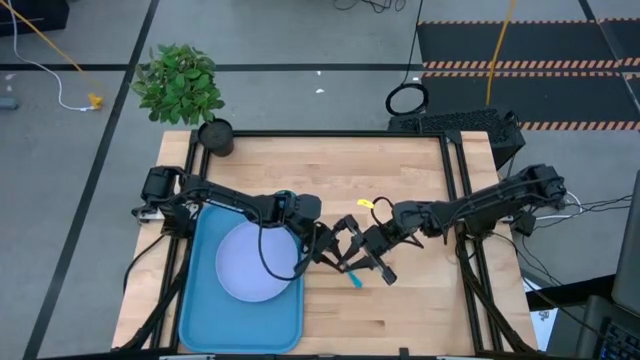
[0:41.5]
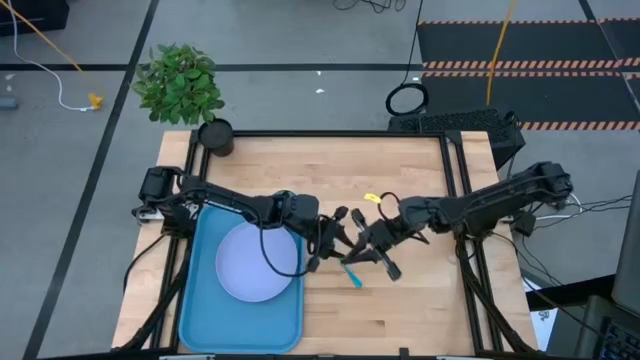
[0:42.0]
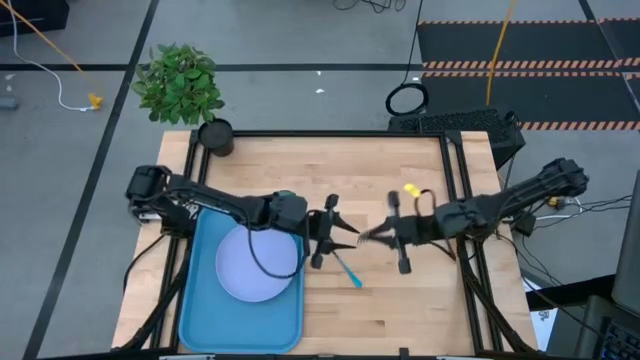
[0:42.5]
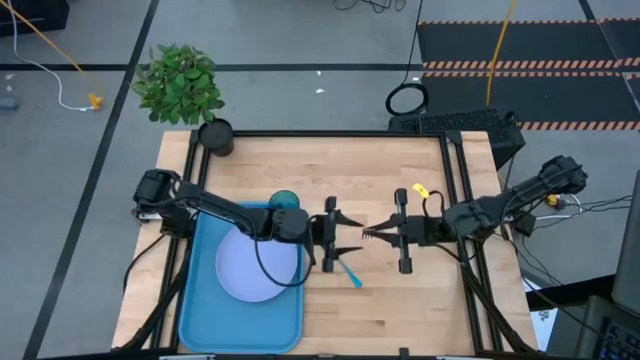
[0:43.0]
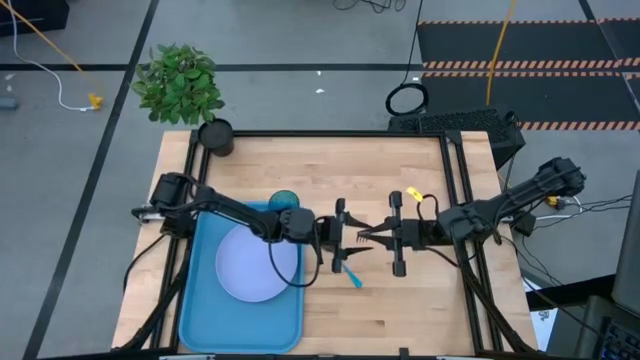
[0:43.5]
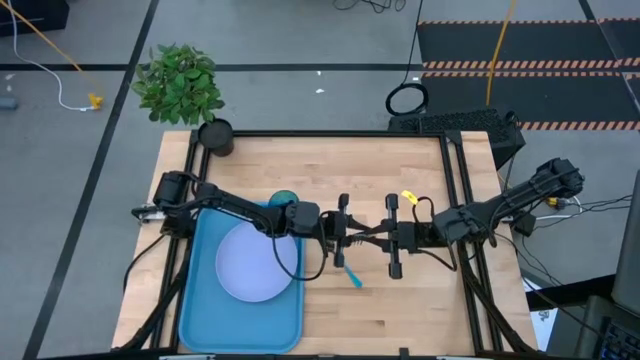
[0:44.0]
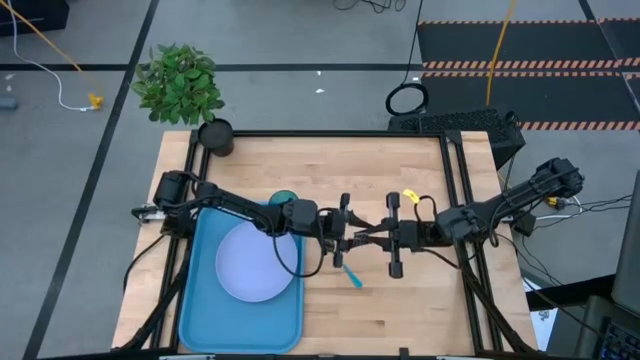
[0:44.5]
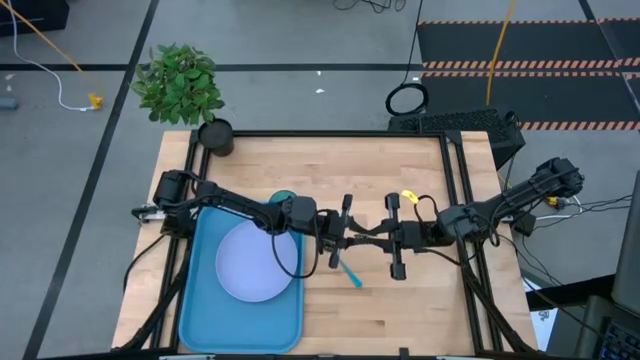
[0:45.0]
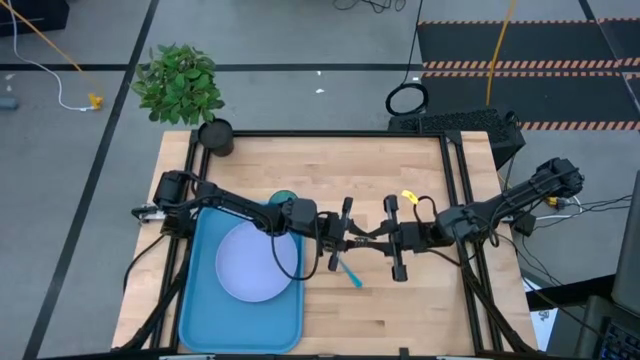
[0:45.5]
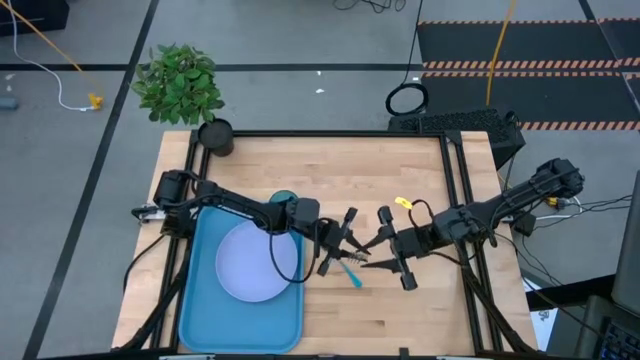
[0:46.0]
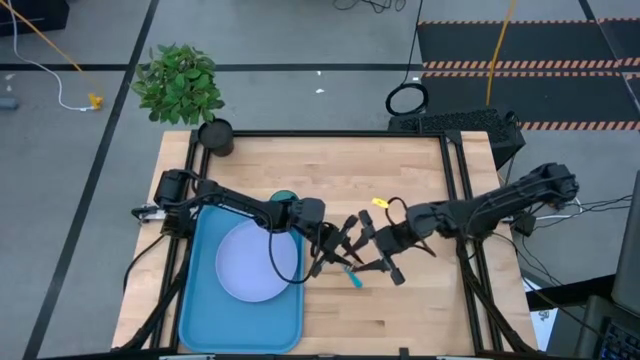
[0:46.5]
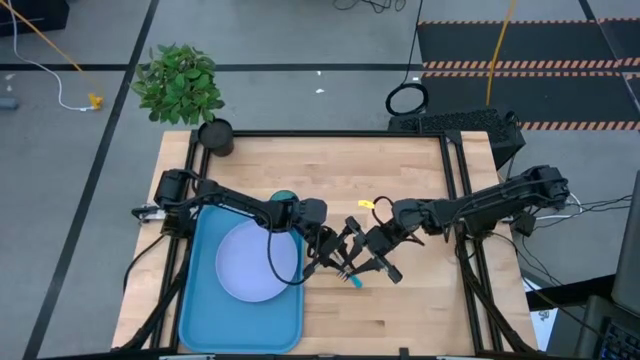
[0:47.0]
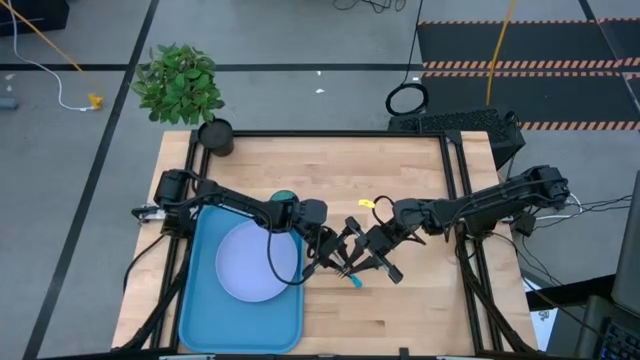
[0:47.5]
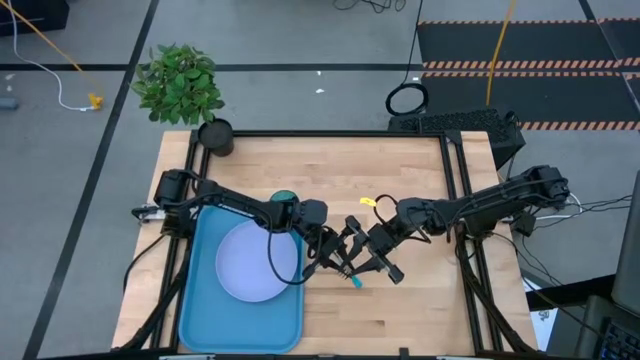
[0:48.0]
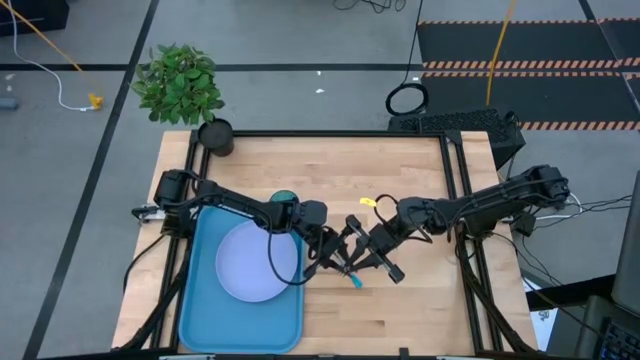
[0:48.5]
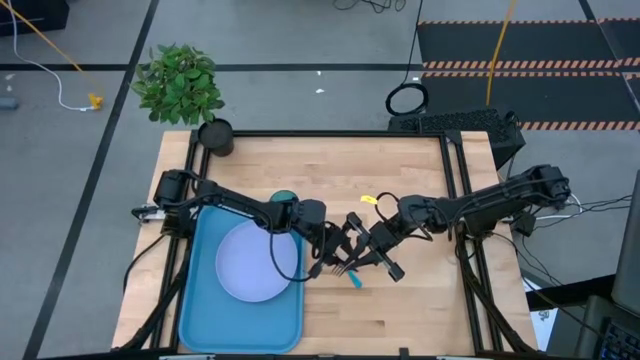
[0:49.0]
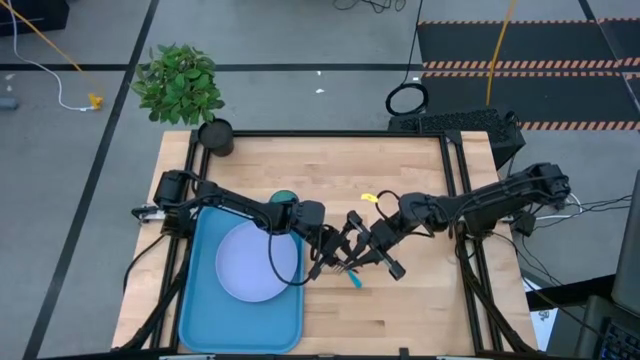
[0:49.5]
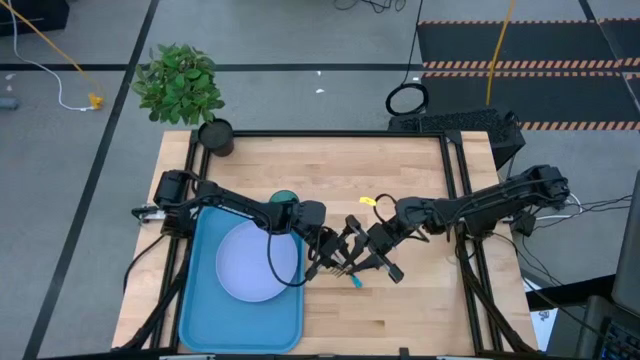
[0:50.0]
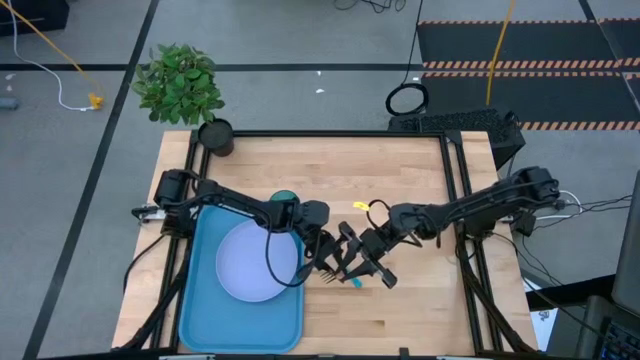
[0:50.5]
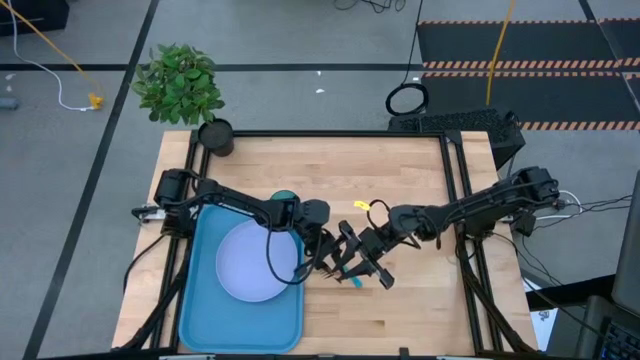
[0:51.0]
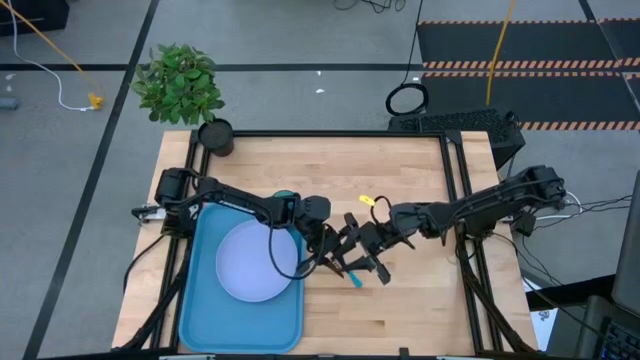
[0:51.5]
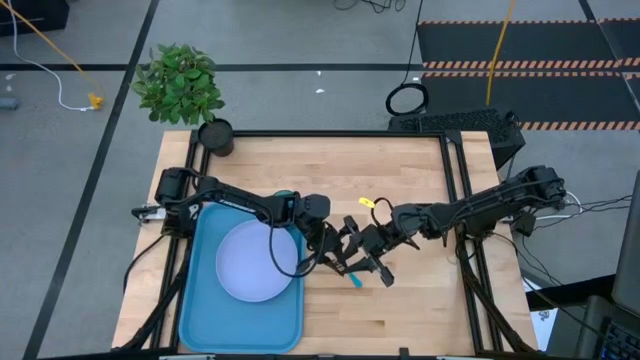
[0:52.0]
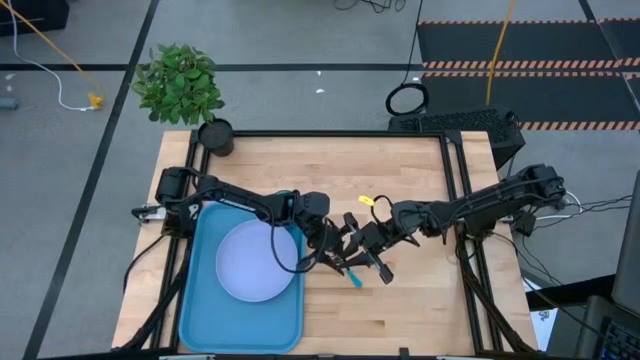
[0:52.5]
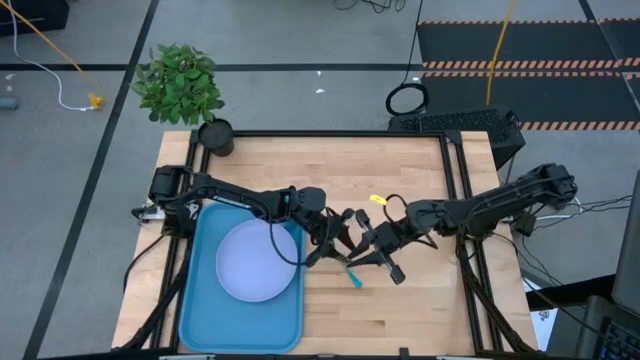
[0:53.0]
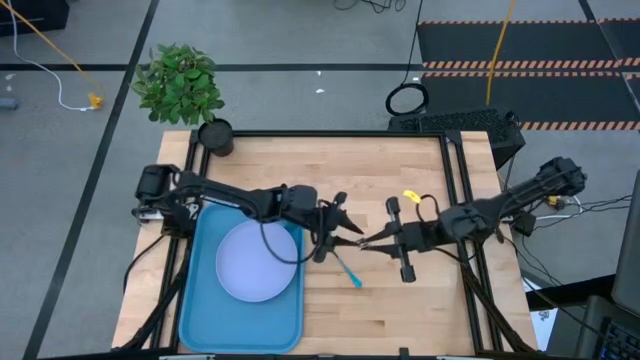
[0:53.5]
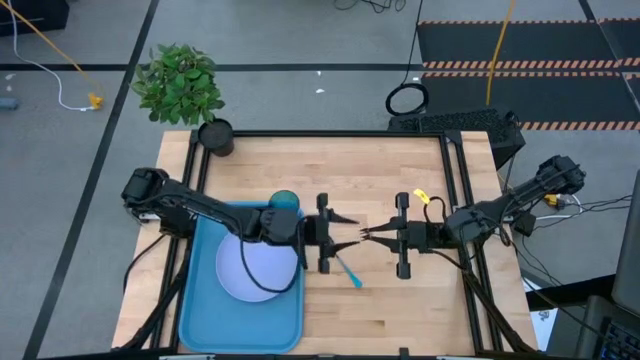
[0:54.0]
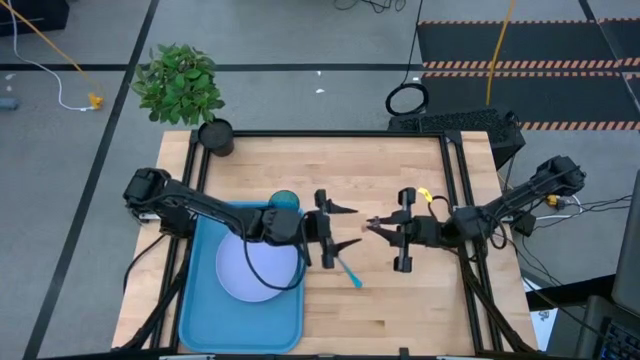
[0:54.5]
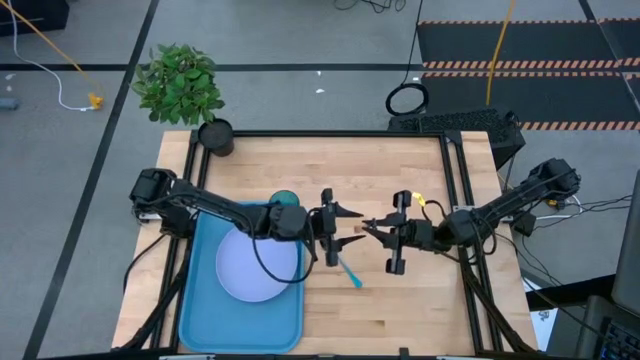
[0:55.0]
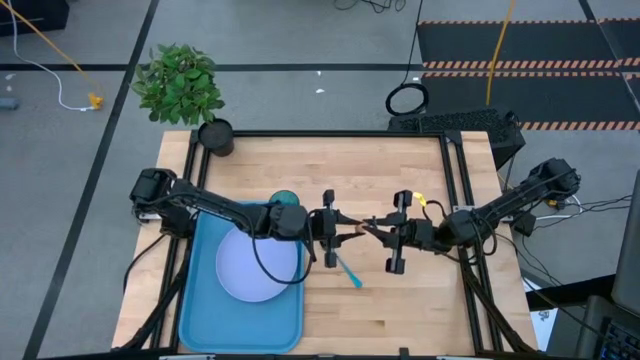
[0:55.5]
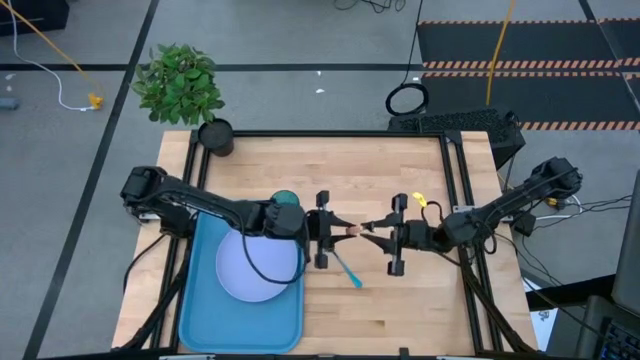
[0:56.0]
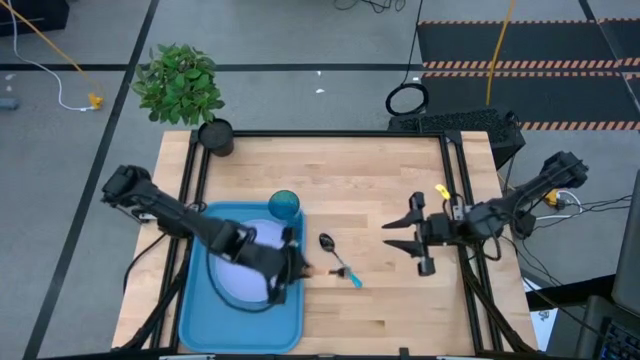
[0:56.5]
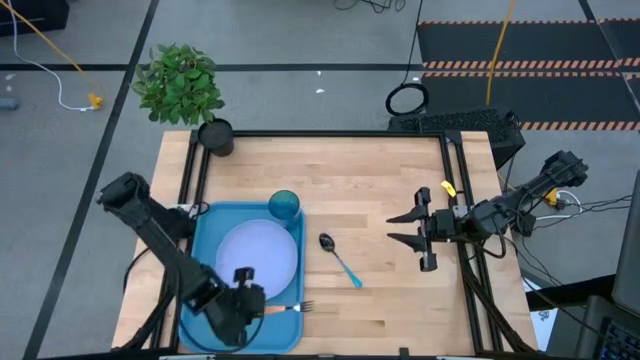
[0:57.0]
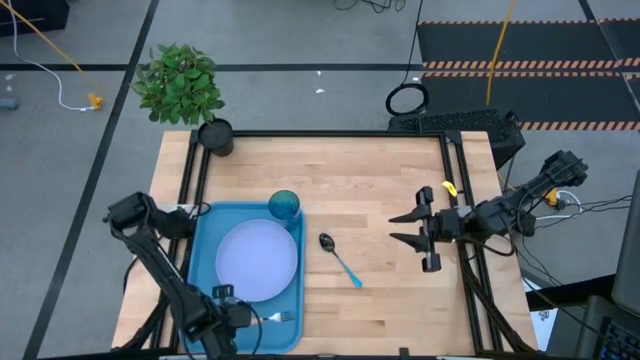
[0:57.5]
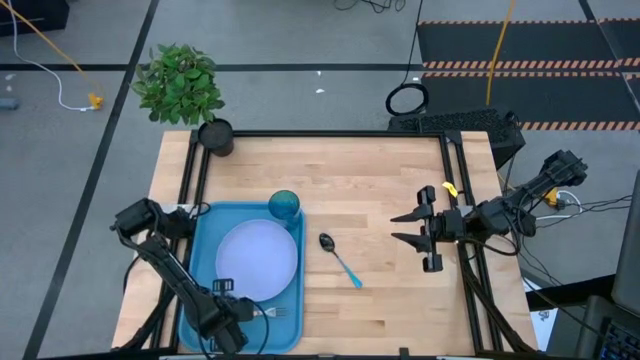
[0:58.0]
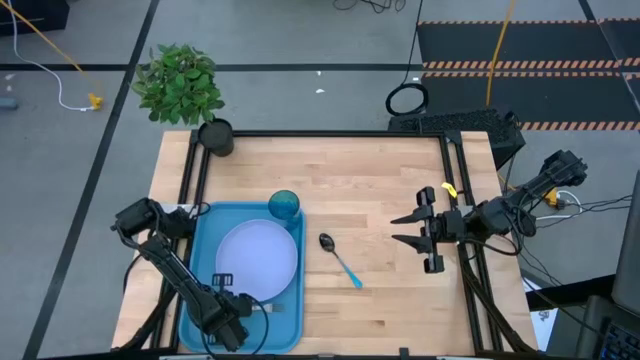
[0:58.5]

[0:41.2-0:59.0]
Task: Pick and place plate/cup/fork/spoon on tray
Put the yellow fork to the right of the purple plate on the blue tray

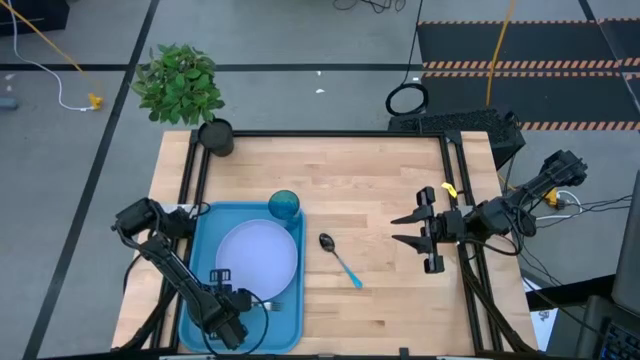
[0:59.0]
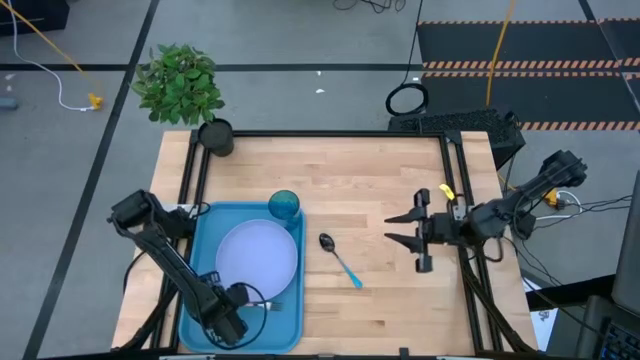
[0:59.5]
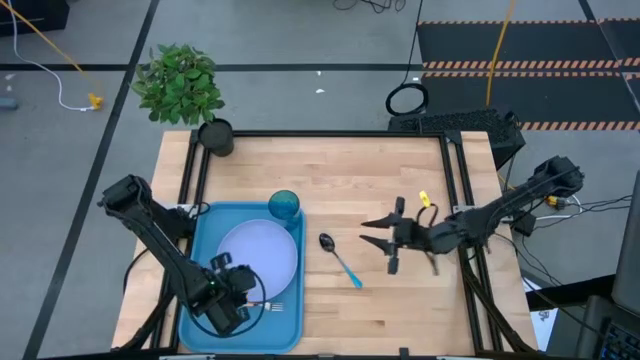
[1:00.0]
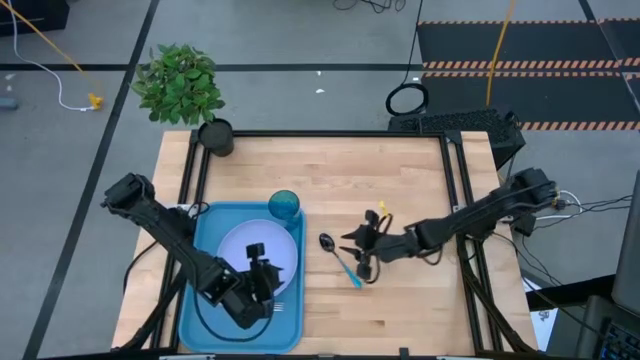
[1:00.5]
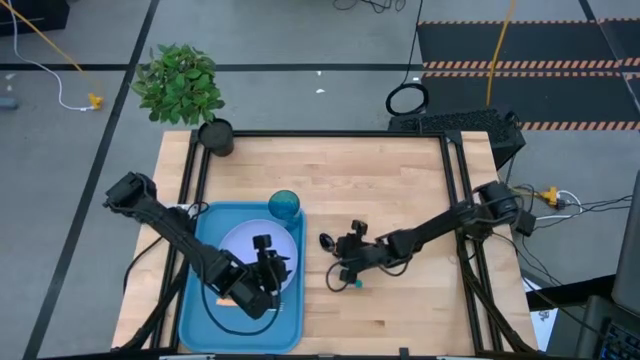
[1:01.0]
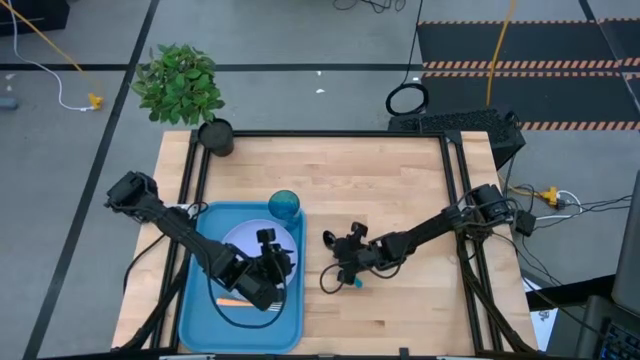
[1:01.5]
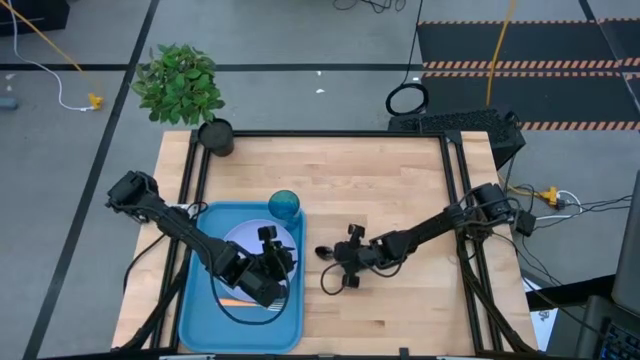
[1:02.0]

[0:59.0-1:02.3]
Put the blue spoon to the right of the yellow fork on the blue tray
